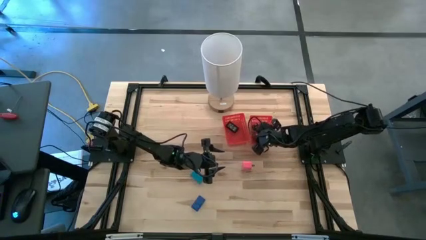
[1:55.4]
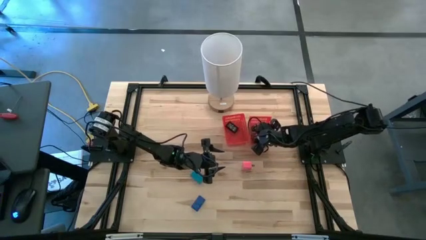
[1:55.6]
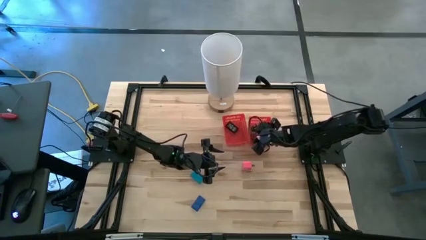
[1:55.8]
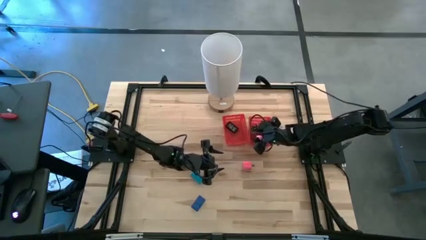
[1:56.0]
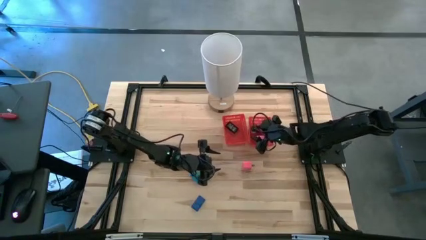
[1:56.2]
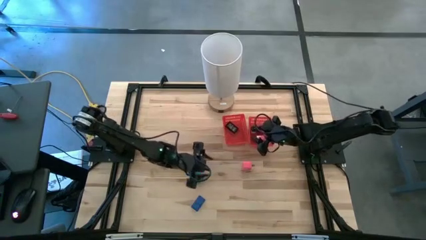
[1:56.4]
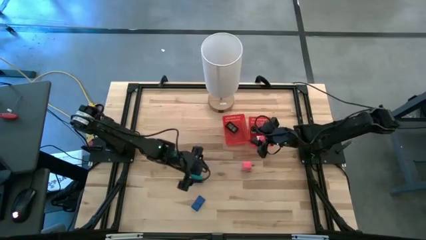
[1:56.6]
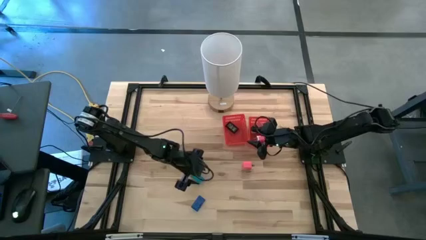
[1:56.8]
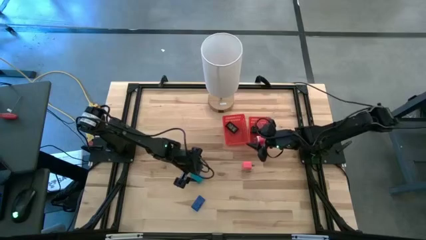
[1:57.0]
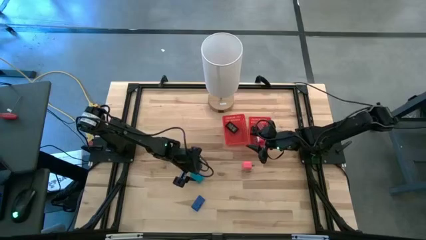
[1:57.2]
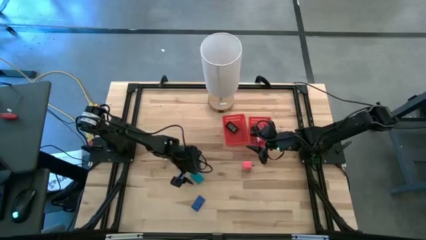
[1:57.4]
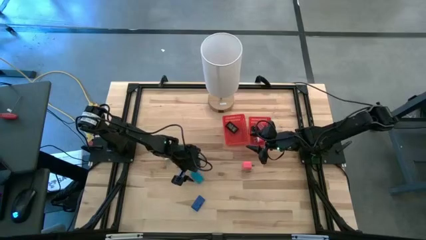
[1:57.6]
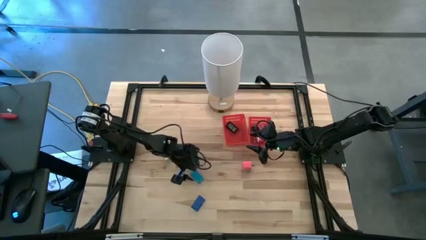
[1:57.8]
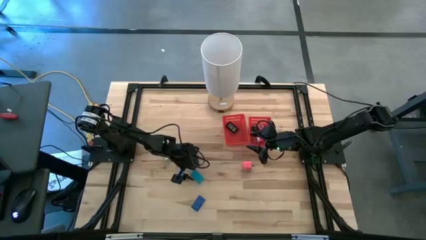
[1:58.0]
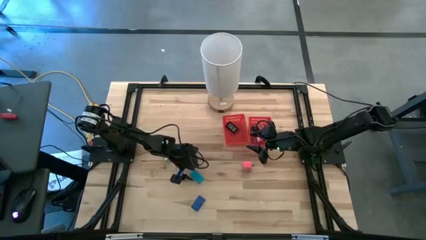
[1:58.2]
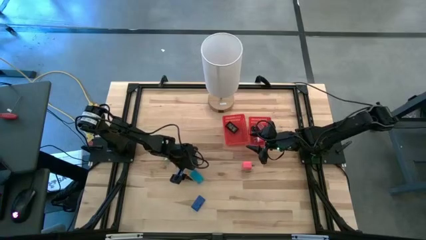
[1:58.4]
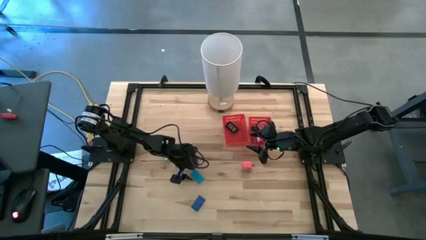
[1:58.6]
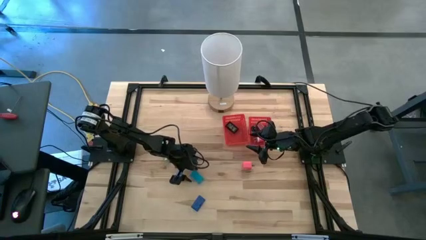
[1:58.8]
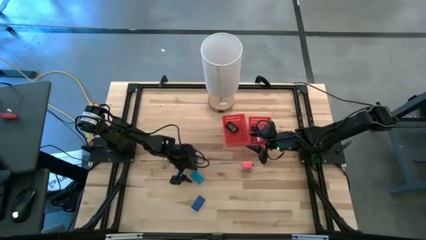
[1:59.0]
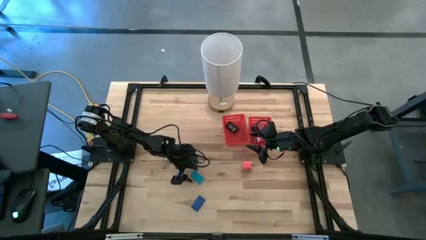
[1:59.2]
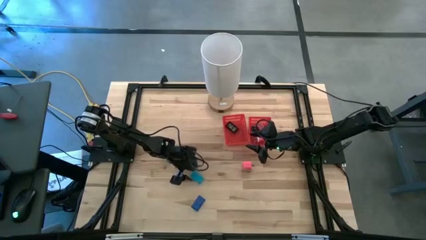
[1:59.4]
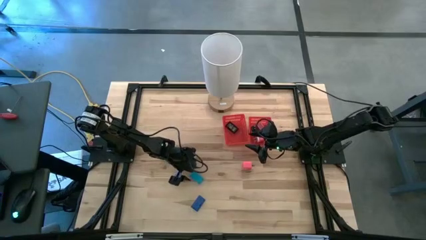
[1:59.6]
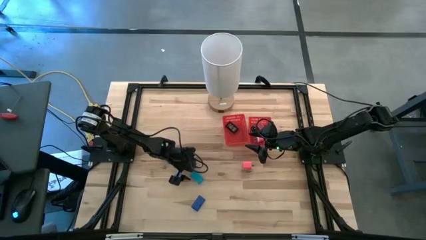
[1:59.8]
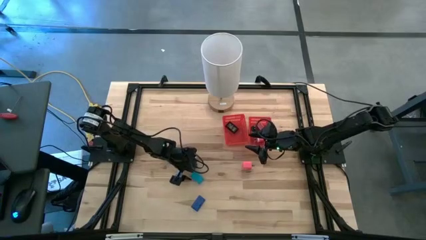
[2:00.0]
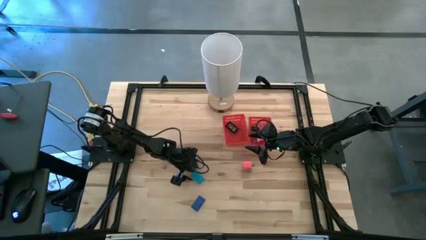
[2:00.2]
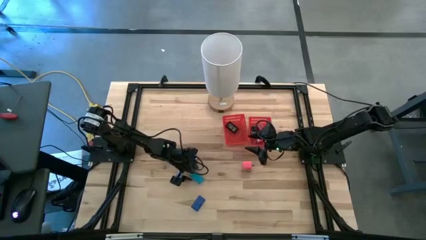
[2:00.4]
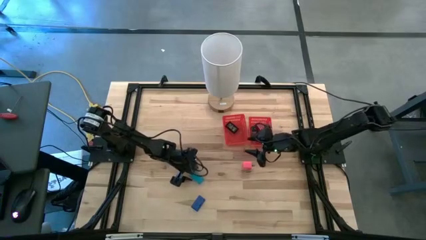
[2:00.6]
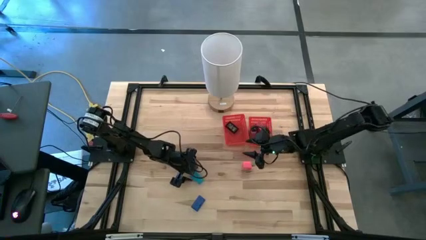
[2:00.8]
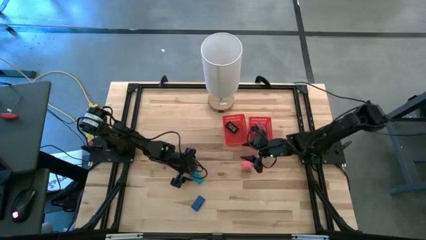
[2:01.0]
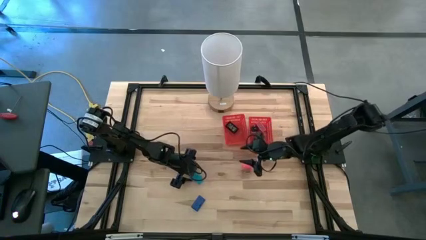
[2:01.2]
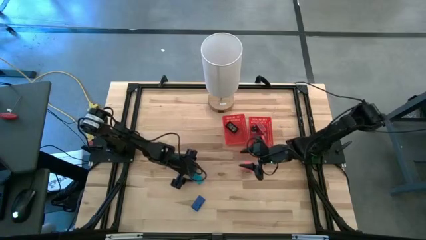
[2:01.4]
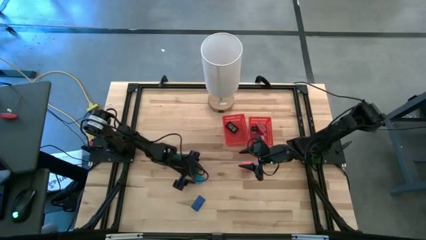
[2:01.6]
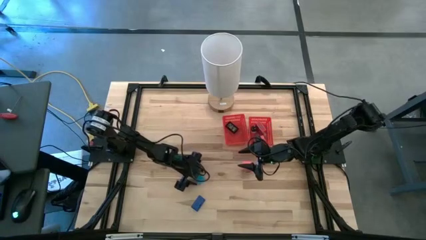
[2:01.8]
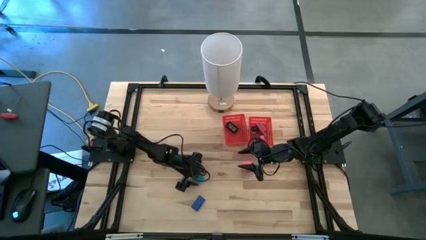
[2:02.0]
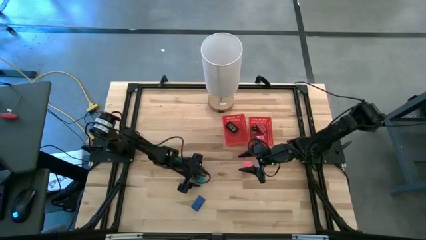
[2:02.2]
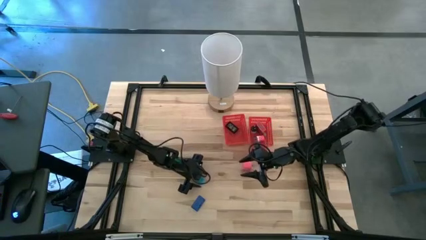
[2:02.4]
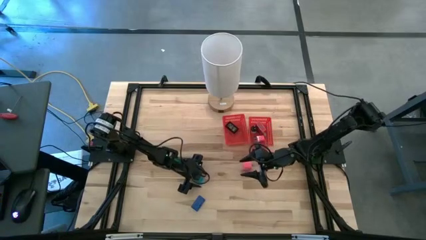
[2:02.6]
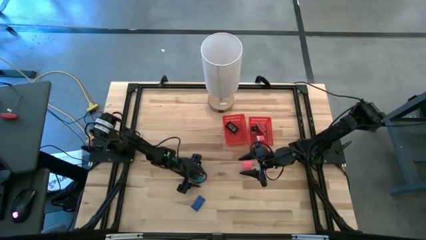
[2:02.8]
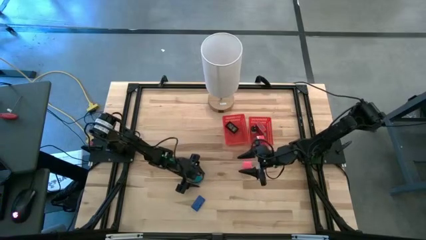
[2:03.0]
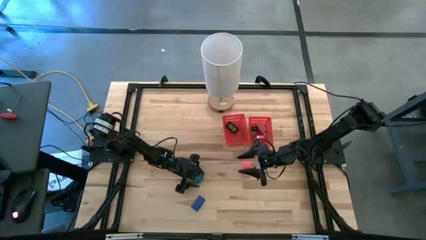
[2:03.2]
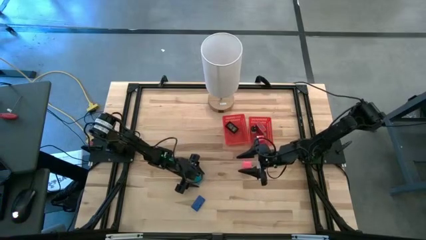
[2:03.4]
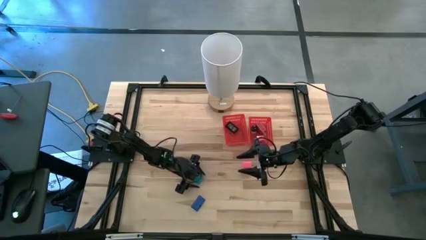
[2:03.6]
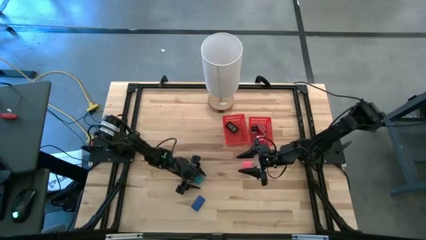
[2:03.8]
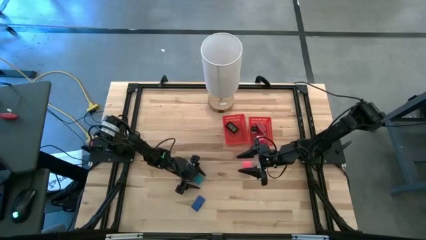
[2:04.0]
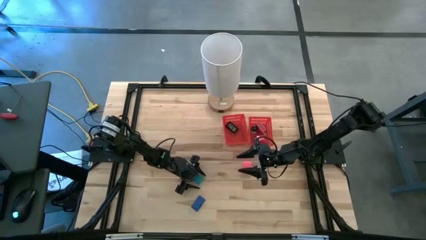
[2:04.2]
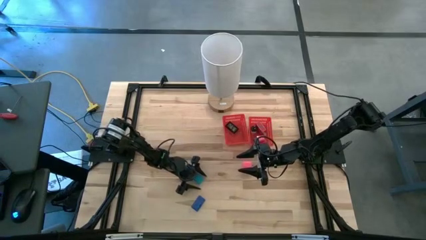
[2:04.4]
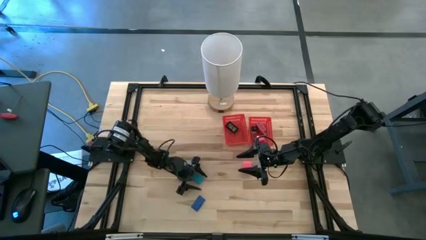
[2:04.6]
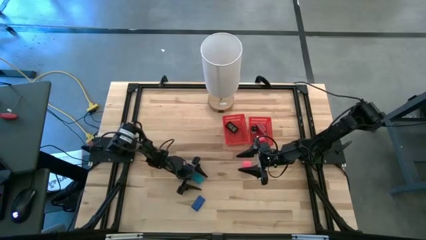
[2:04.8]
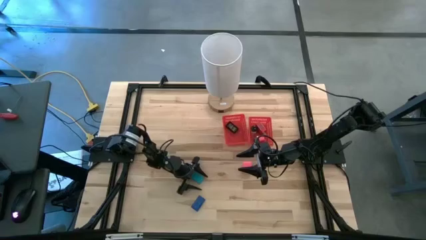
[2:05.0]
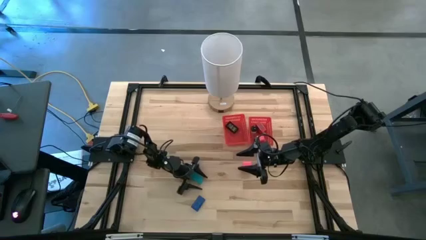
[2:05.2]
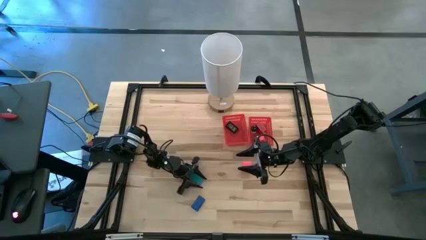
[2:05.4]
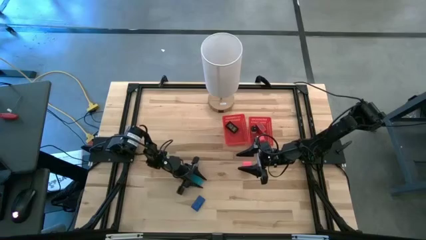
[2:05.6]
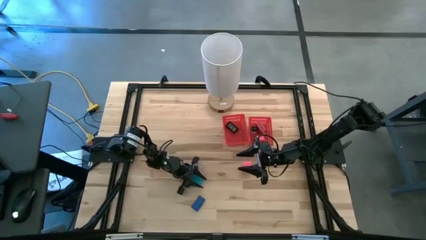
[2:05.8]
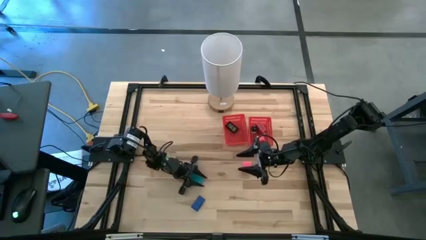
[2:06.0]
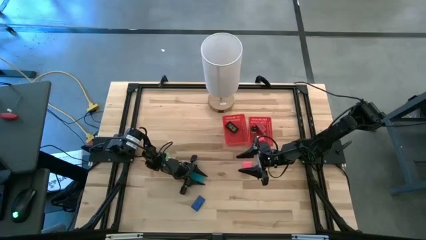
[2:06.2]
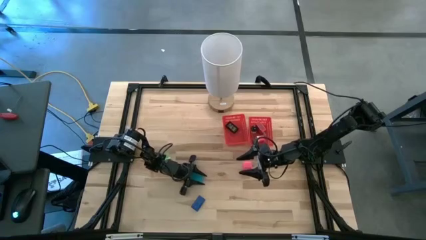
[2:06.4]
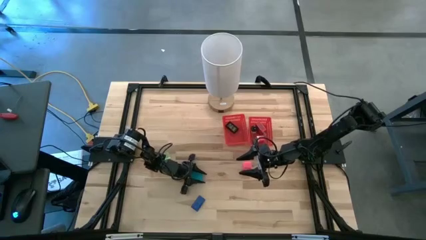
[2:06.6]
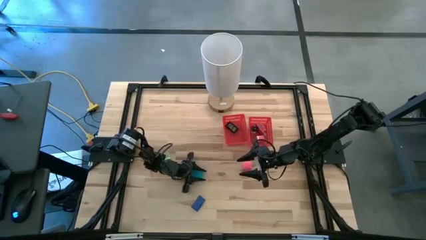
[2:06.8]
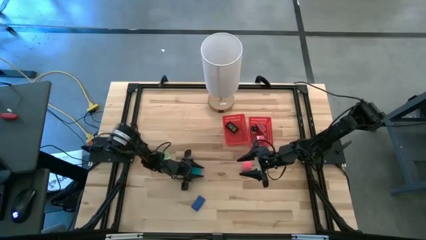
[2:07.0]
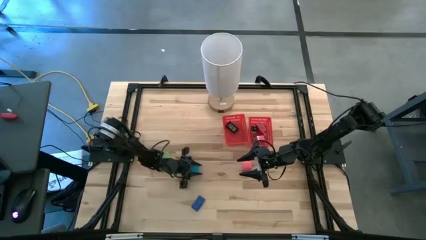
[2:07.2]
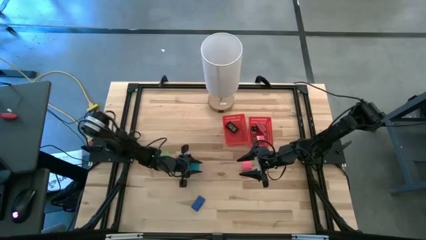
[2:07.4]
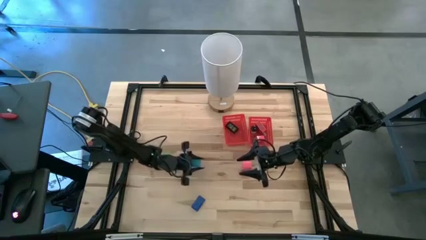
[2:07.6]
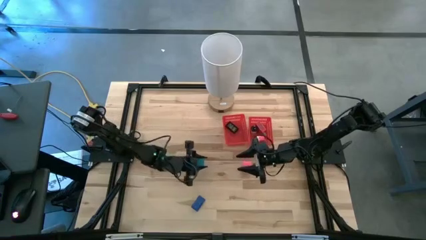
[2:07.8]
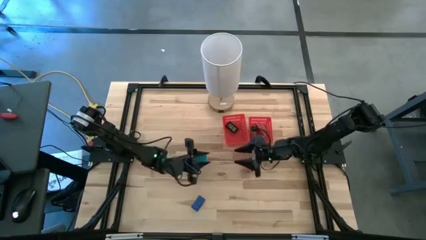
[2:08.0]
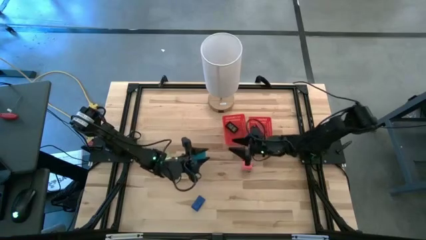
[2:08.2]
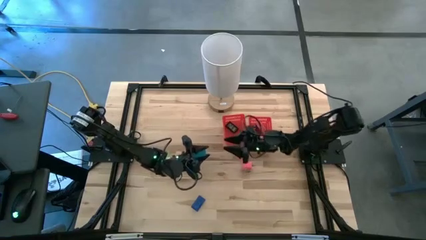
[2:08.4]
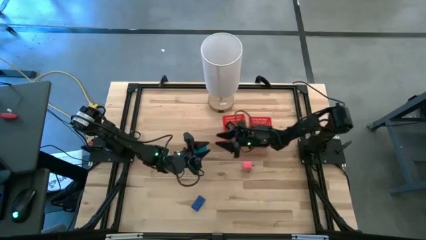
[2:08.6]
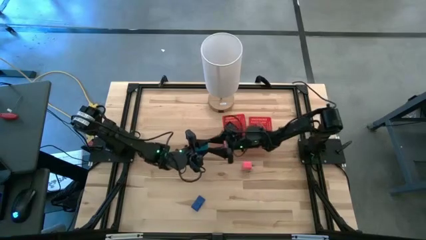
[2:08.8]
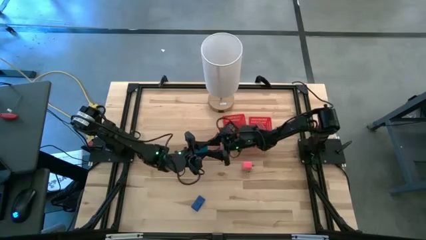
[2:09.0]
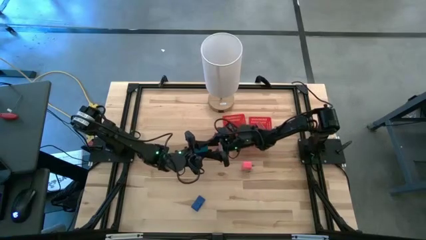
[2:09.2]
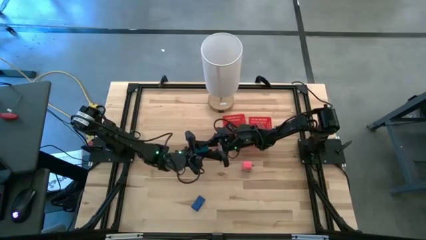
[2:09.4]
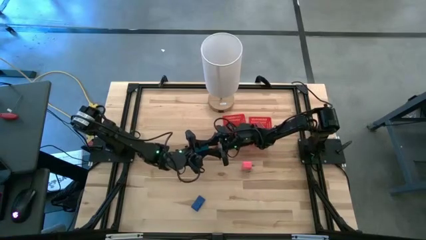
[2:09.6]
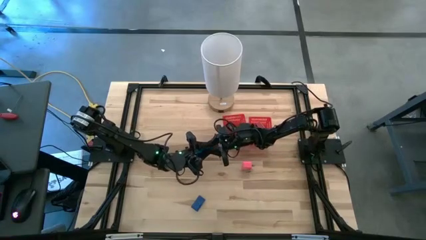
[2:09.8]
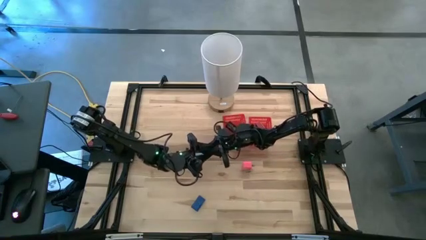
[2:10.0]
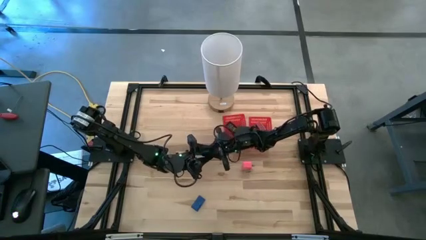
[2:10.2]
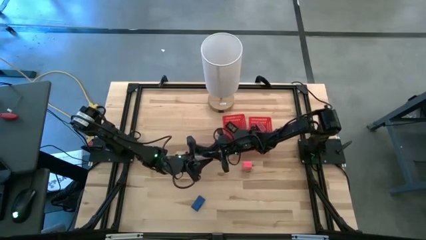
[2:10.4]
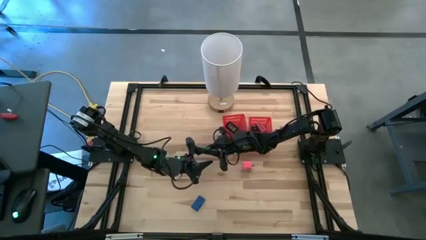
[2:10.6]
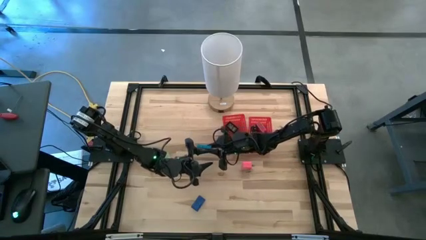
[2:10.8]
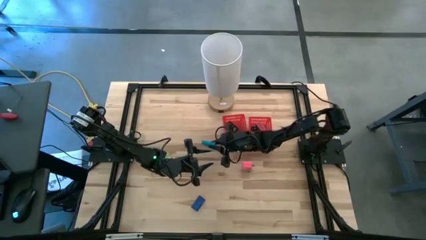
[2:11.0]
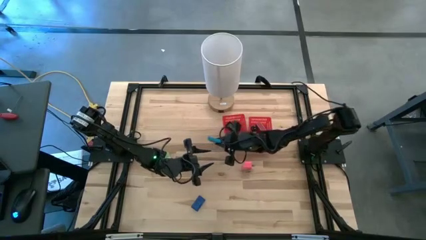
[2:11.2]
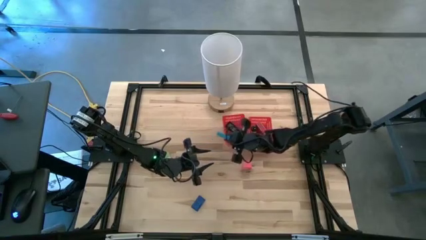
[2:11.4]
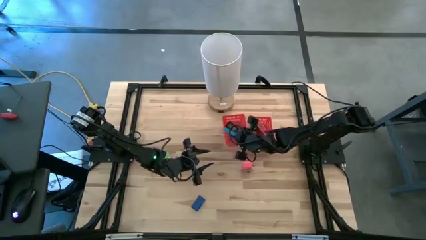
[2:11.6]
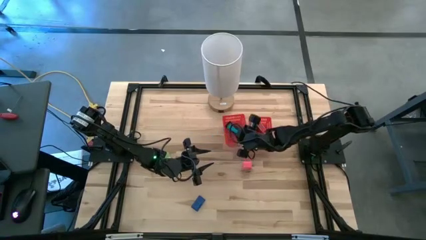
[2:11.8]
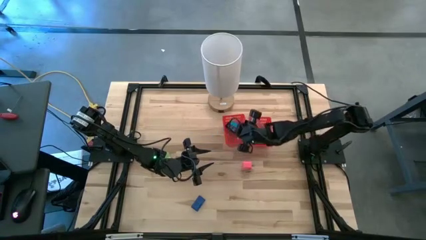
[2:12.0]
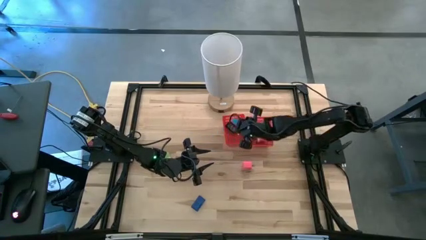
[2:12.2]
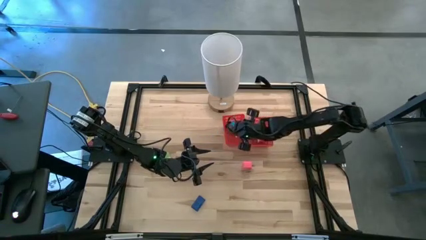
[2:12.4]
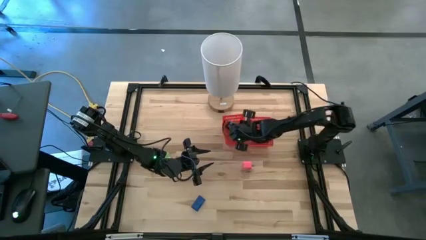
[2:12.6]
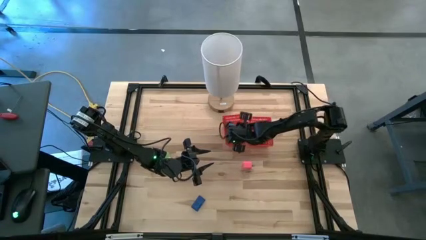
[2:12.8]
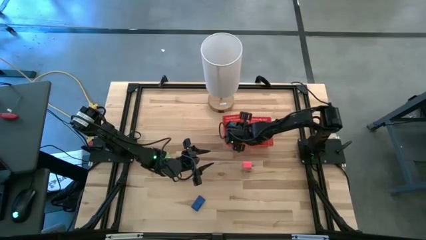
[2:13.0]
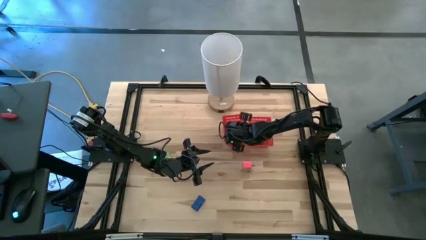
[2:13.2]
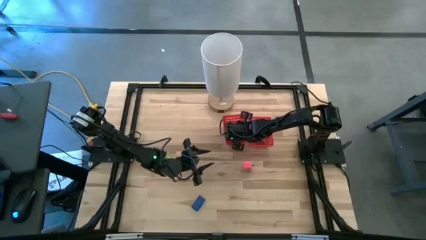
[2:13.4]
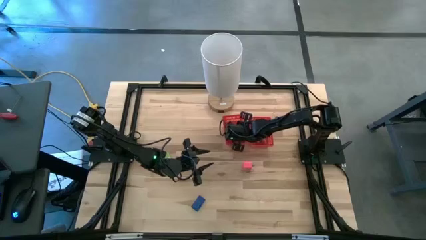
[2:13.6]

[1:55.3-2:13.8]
Task: Pick & Place Office items
Put the light blue timer into the left red bin
